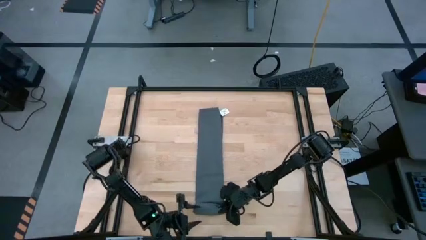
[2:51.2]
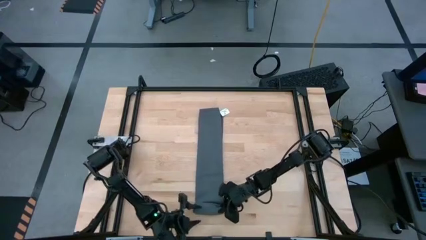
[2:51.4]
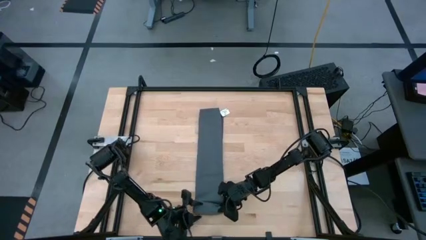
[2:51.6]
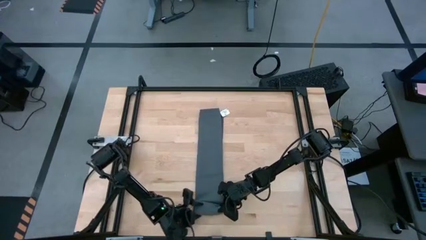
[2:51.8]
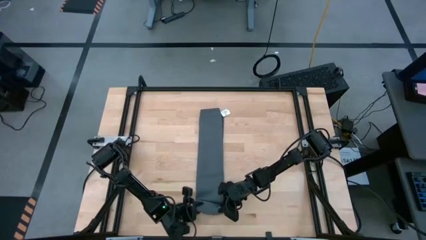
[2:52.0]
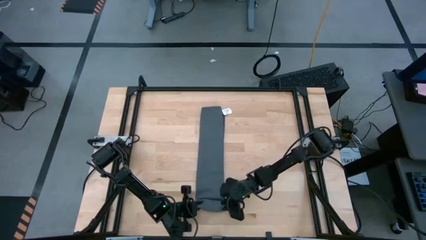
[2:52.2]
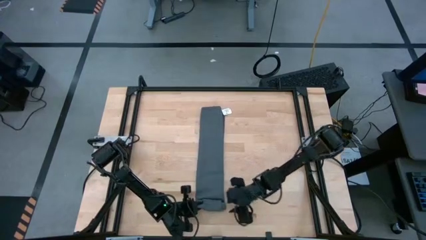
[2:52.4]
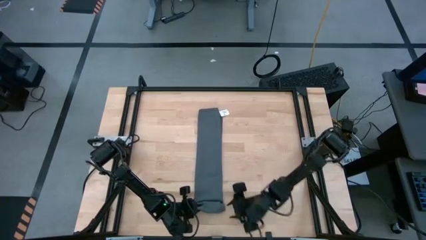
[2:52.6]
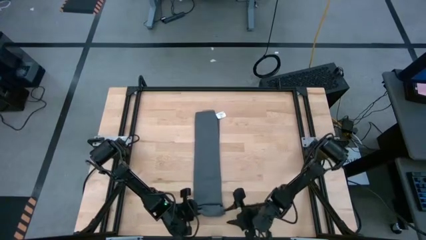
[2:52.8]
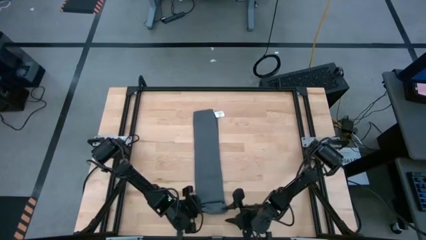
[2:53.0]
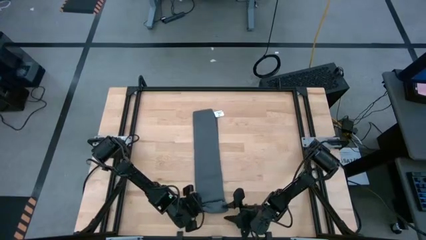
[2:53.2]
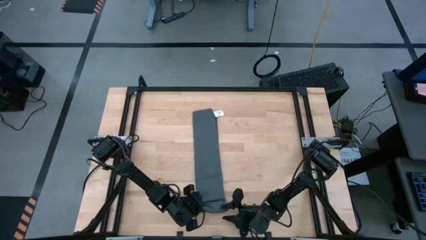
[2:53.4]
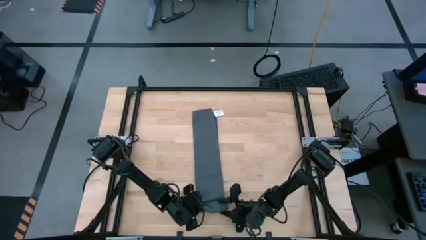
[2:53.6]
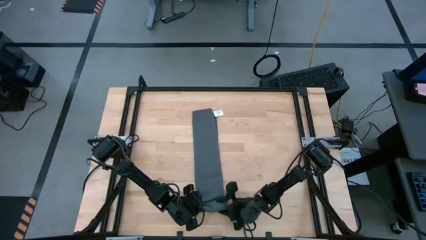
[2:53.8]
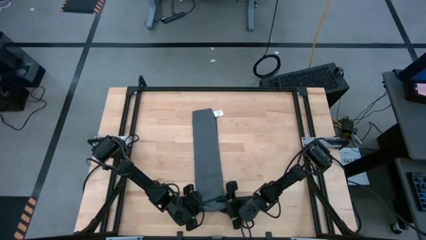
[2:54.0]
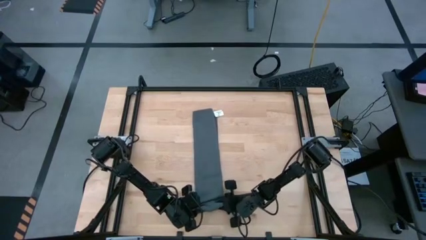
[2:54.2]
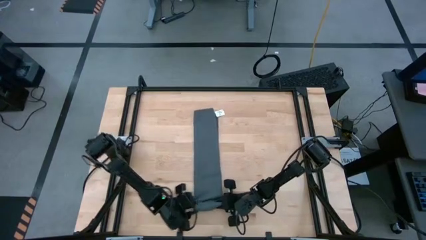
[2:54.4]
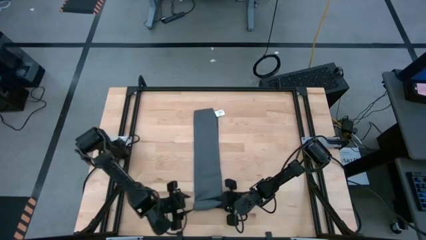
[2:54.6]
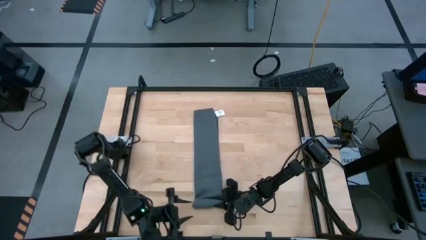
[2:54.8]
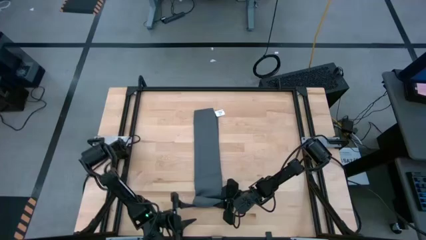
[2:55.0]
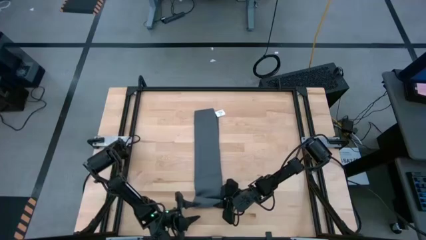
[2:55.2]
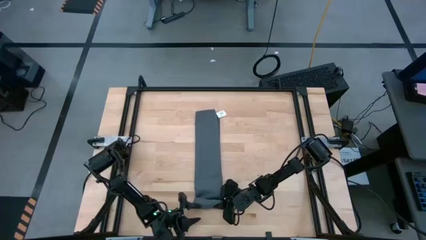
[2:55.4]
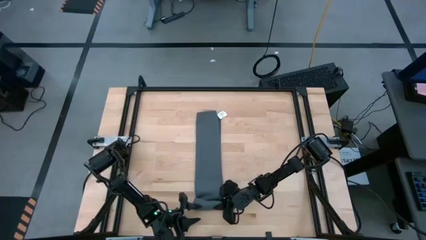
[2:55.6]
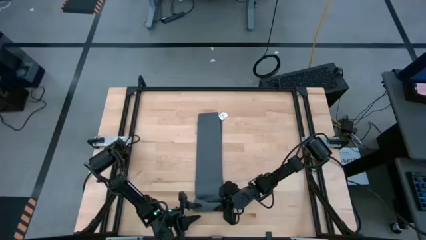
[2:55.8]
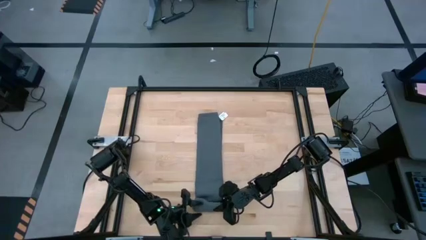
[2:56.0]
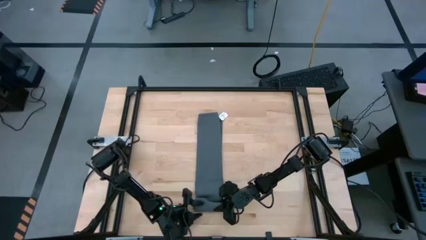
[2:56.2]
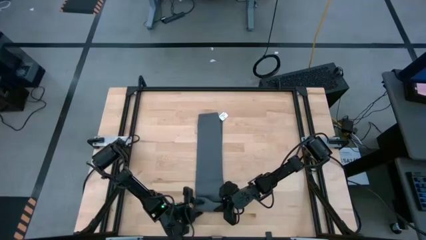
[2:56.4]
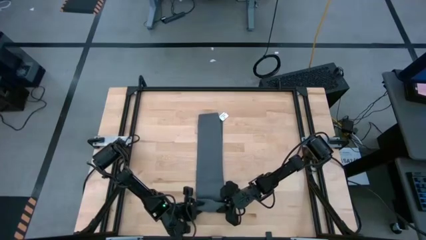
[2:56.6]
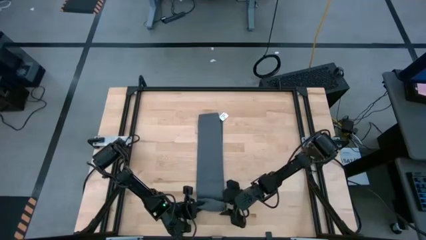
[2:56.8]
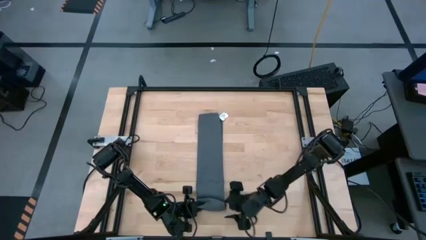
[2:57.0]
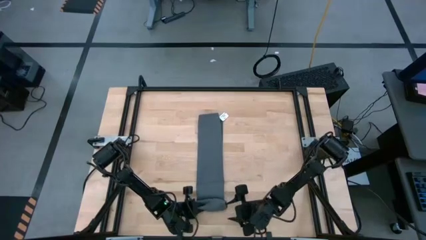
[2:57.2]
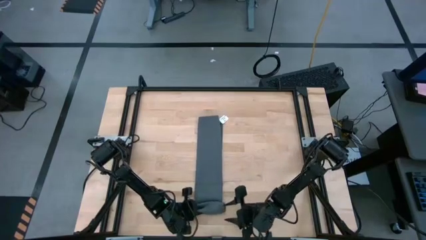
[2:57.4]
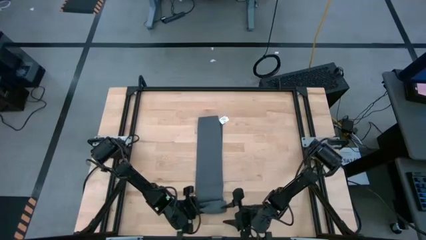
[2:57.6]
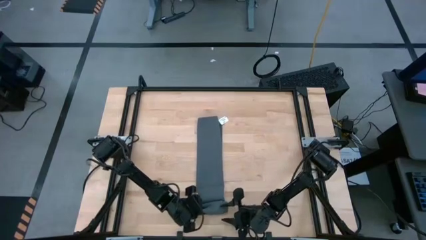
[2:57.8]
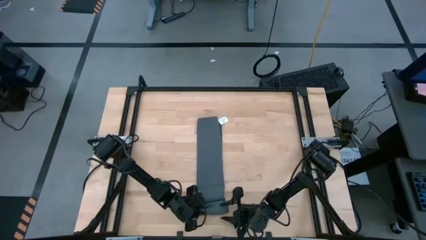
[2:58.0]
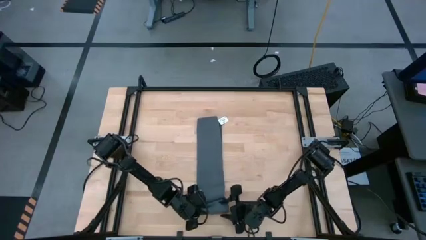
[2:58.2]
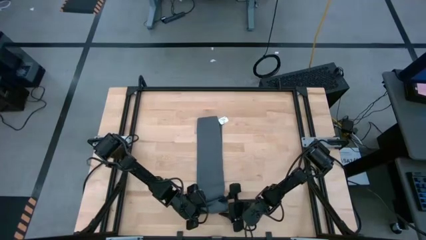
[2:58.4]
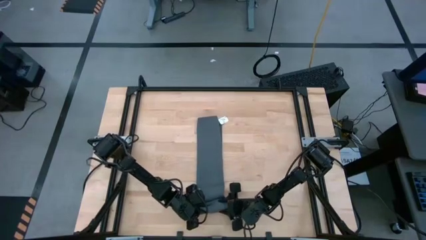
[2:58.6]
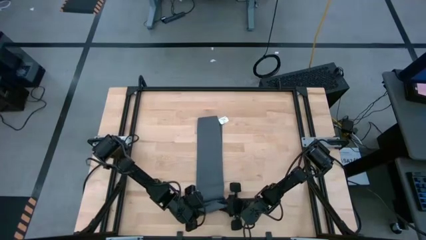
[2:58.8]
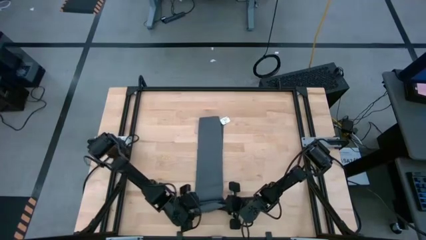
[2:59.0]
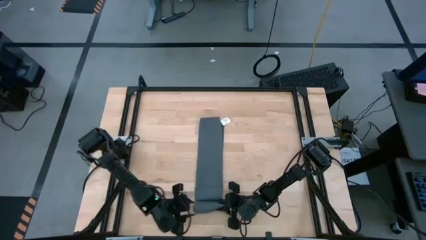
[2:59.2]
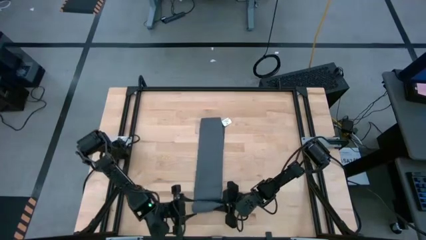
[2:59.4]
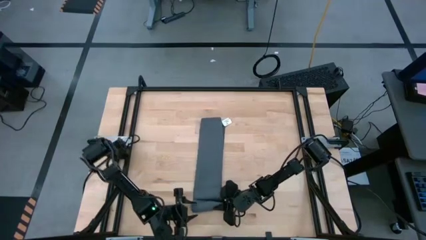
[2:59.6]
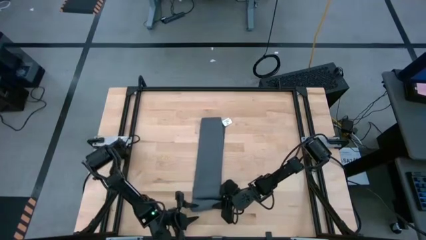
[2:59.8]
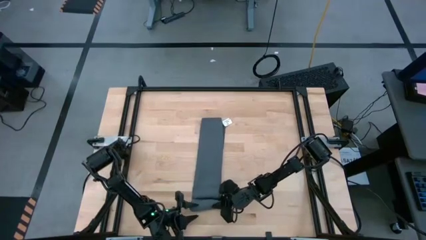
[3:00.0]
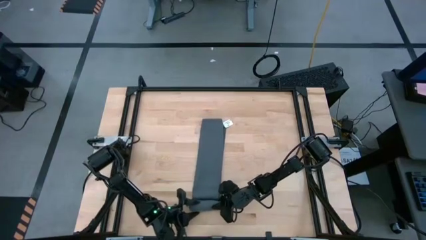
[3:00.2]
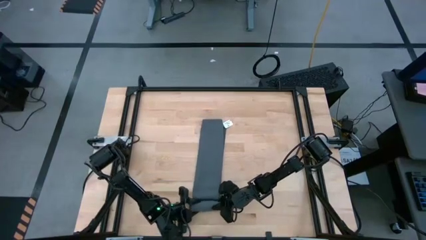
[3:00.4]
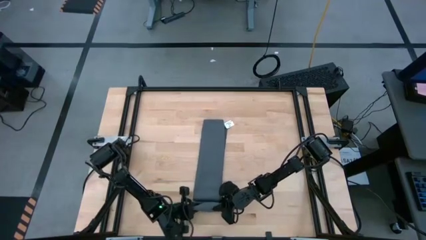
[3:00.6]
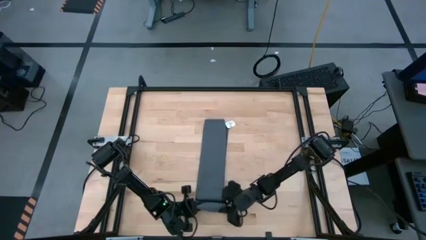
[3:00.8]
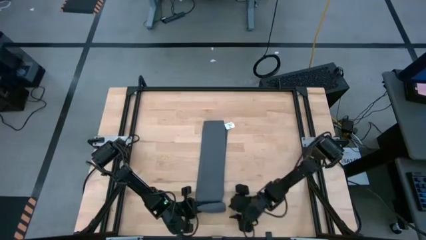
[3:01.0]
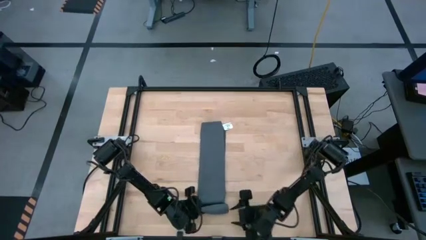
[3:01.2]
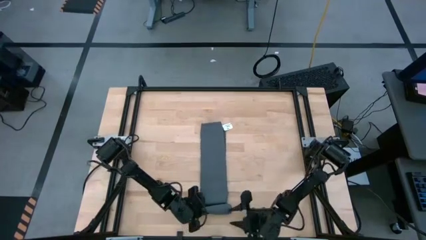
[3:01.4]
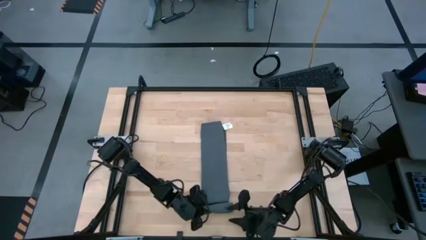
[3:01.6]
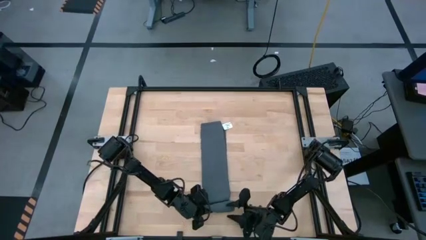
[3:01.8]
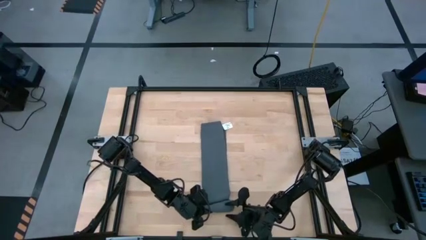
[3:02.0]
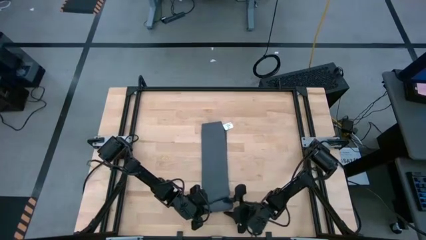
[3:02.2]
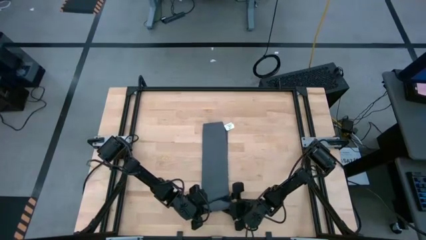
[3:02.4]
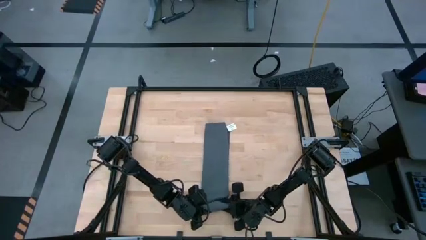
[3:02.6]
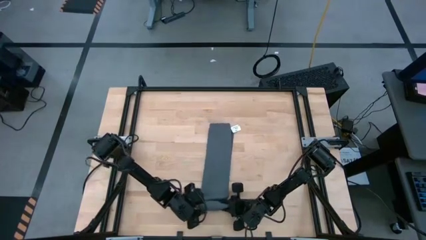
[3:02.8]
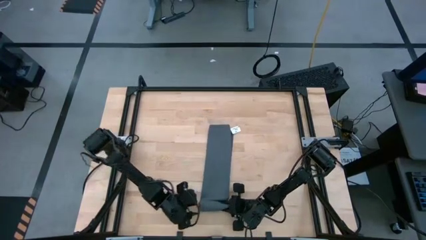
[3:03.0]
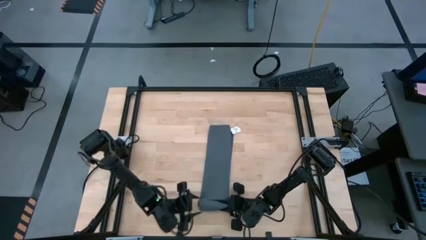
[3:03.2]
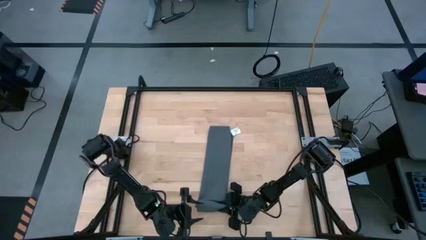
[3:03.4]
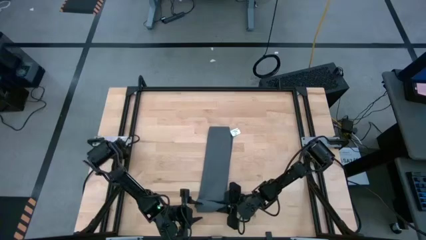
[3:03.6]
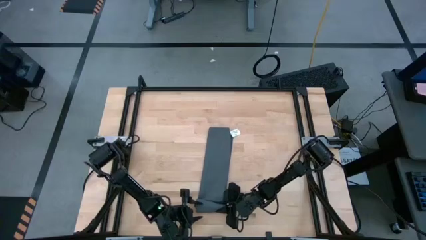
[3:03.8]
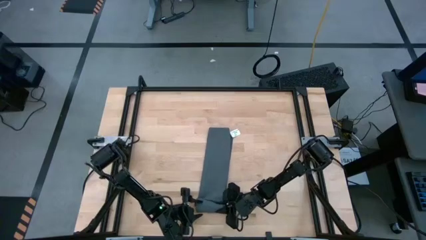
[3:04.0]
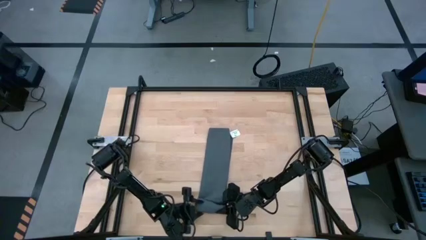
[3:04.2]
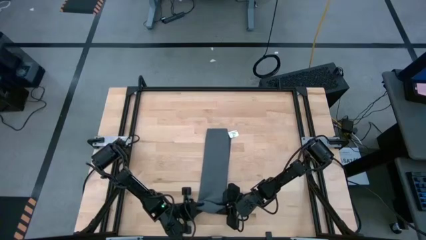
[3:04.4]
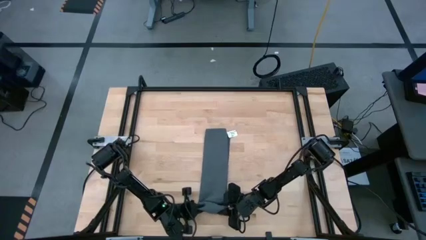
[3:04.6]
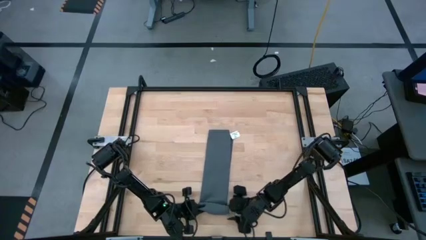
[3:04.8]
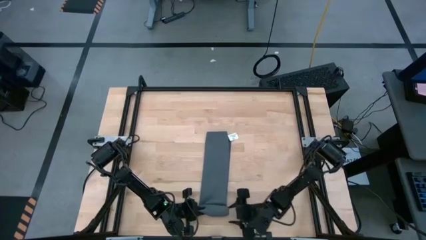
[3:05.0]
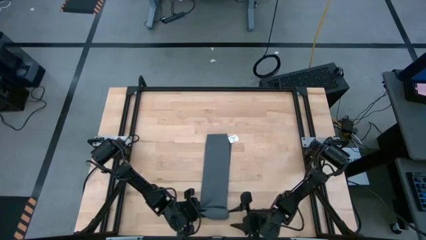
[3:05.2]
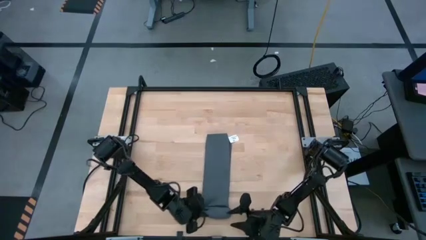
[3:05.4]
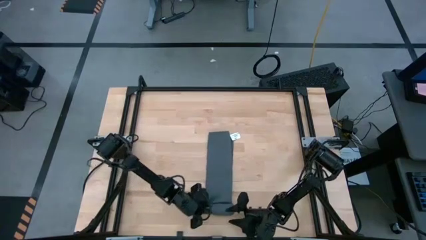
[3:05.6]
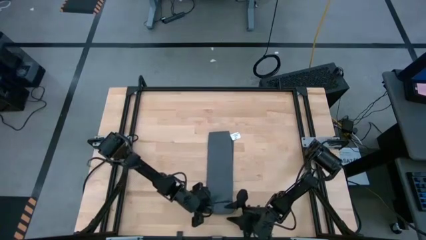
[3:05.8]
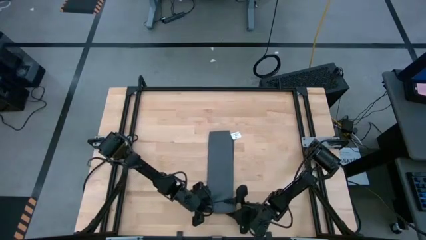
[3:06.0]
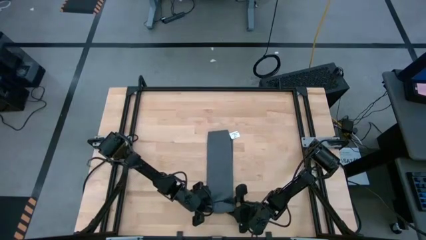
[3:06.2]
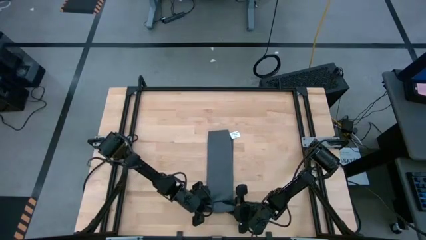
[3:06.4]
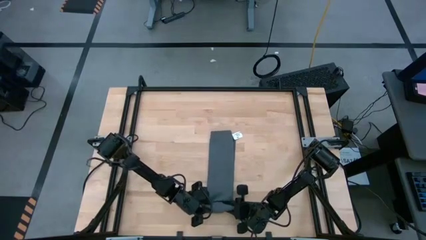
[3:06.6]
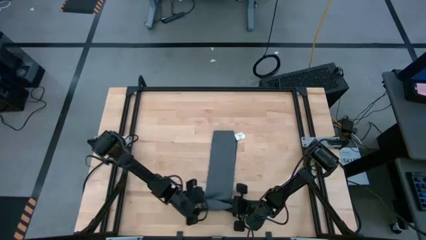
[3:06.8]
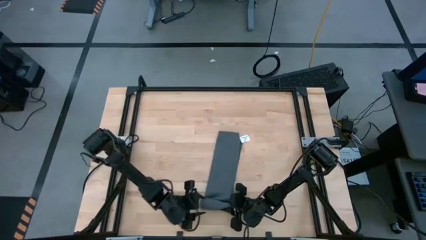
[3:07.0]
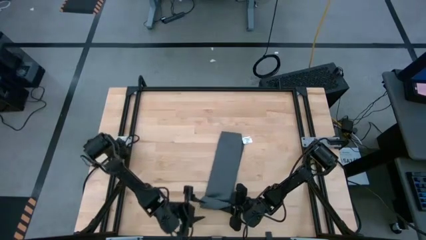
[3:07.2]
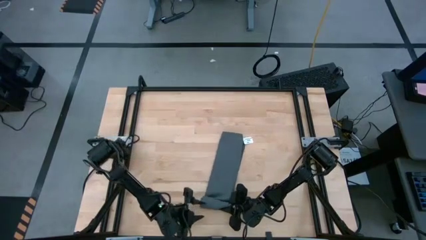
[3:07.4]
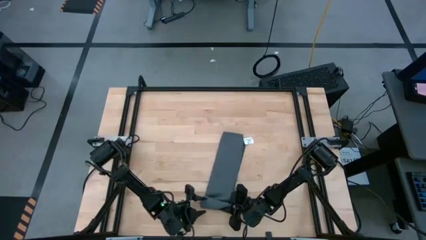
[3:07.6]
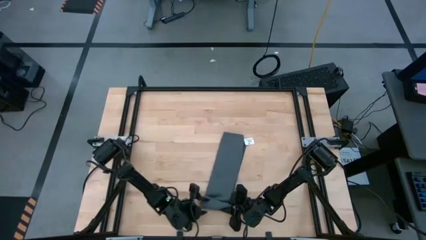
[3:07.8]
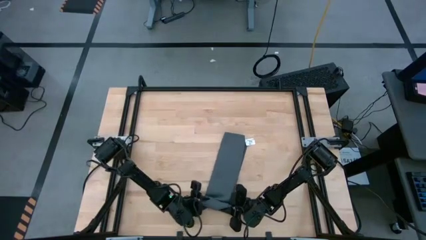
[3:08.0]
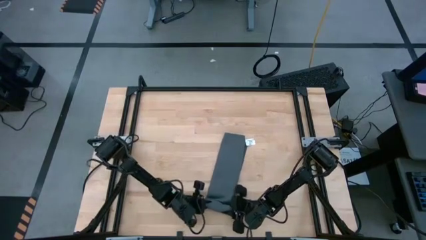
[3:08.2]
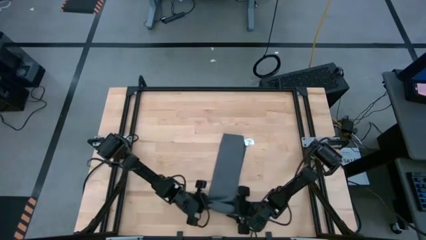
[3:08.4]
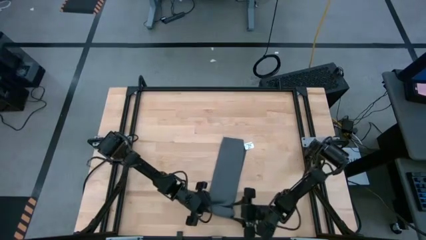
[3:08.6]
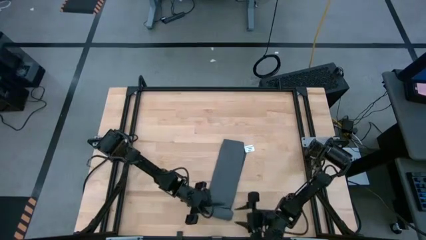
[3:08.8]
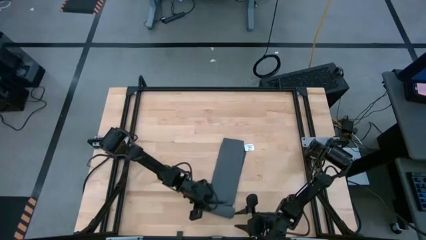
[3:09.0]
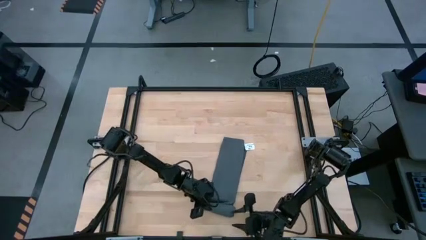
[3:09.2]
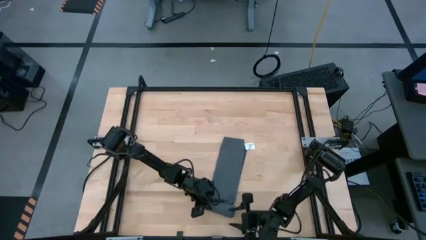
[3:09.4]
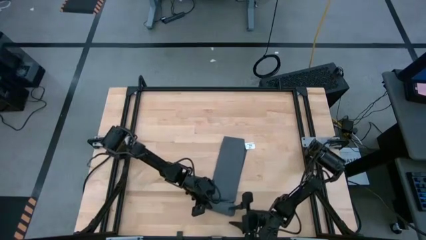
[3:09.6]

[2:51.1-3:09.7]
Task: Roll towel into tight, uniform cylinder
Roll the towel
